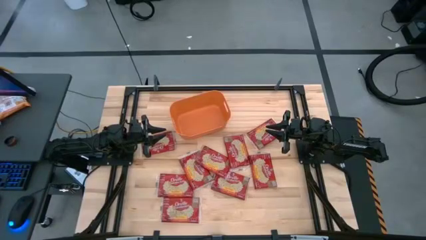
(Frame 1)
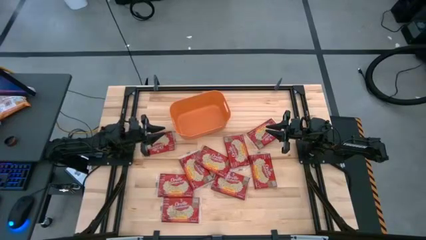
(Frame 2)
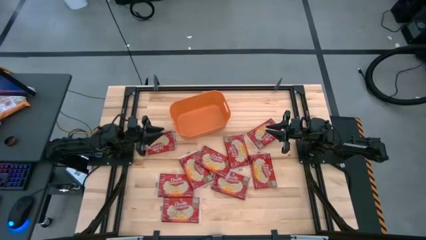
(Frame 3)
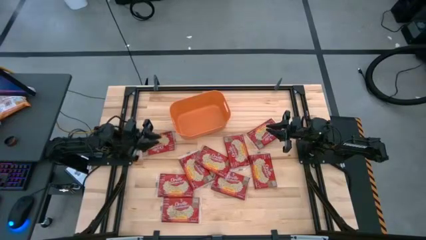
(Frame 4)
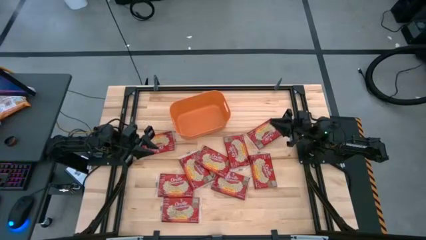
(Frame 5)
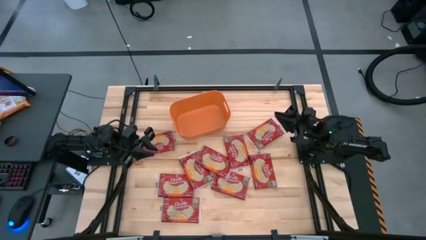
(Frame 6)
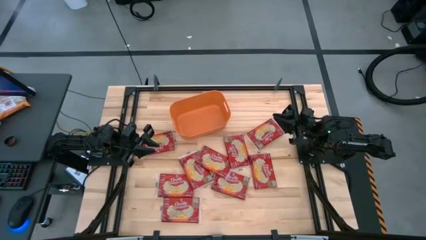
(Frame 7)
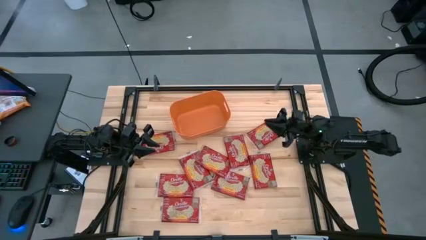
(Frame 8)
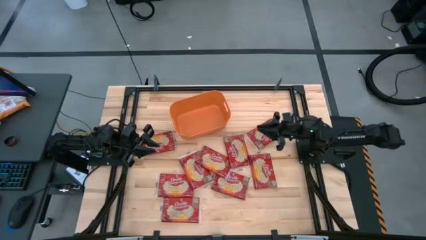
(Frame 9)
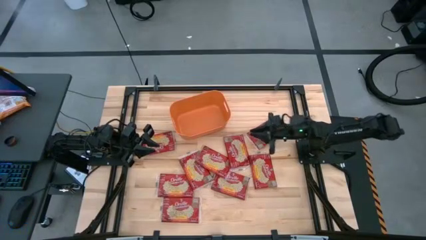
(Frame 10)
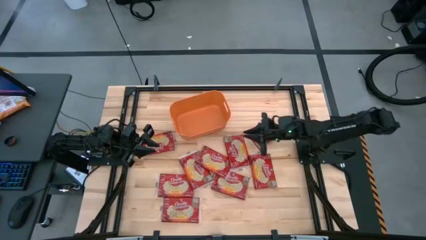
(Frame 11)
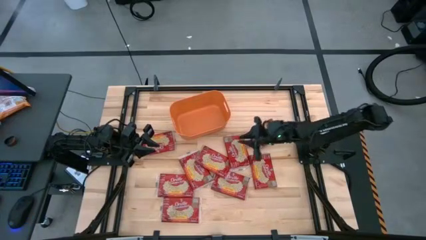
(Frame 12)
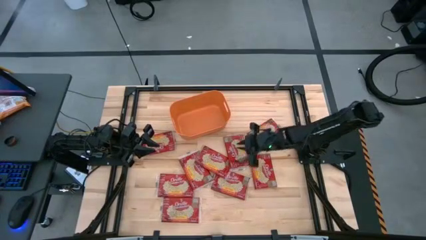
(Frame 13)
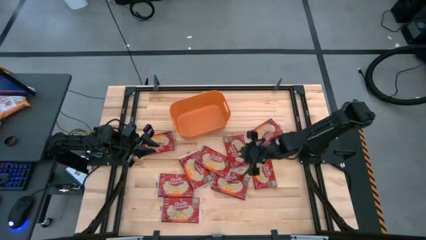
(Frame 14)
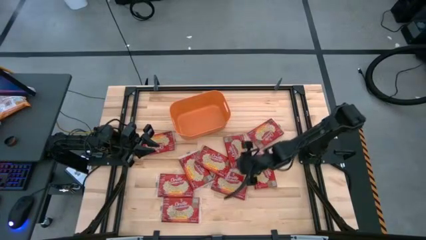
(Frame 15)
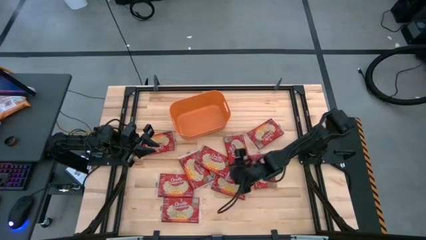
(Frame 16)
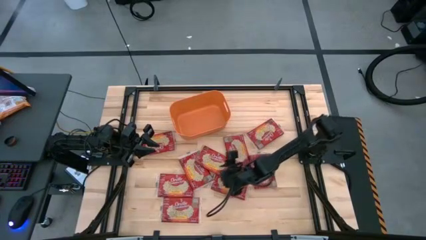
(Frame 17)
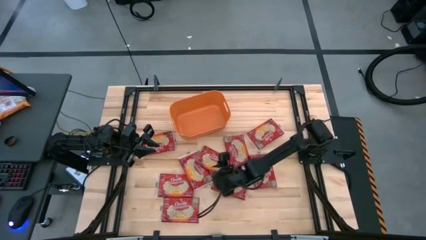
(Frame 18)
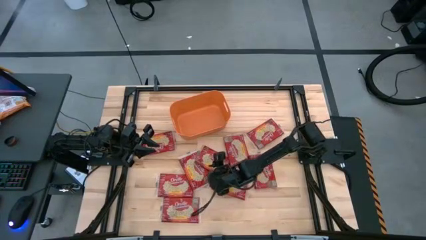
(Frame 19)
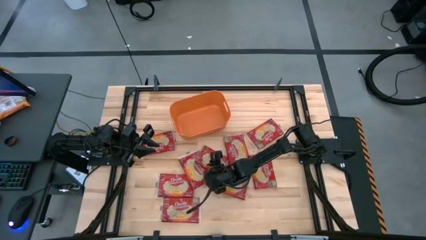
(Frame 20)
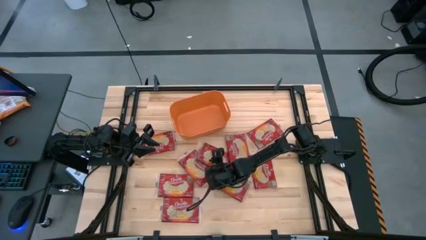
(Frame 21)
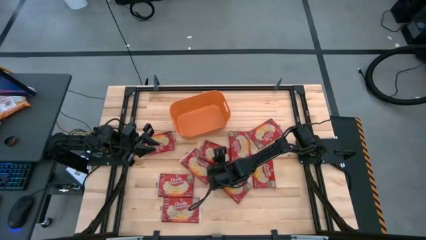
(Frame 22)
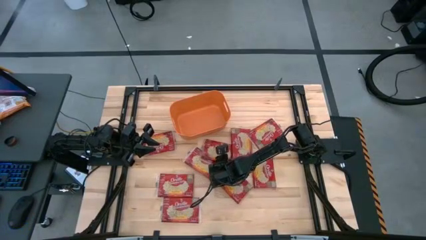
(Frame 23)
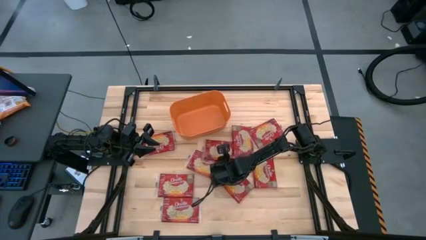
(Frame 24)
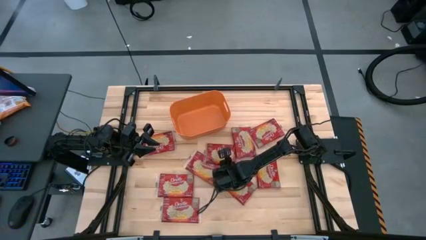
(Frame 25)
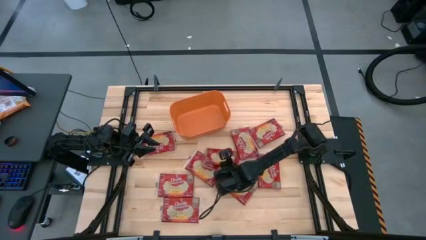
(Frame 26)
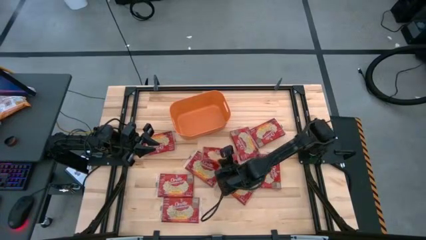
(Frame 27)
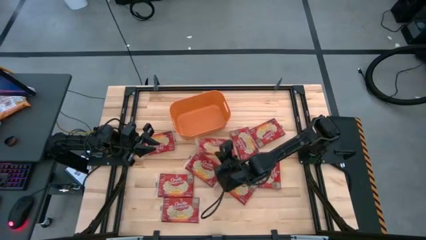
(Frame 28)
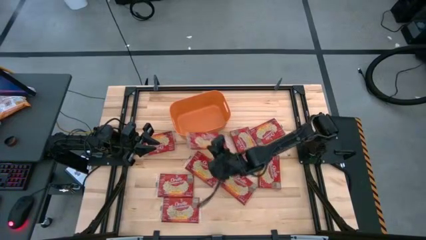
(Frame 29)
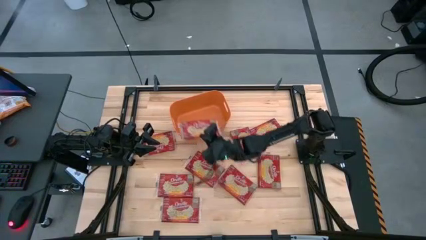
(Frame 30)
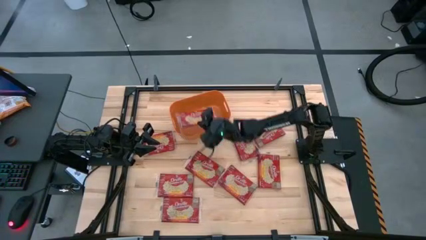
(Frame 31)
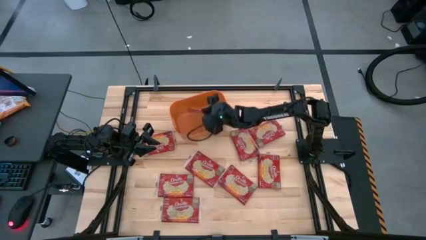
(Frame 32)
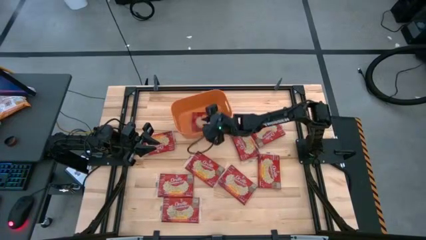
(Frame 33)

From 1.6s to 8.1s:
Task: Sort popcorn bags into baskets
Put the popcorn bag into the orange bin

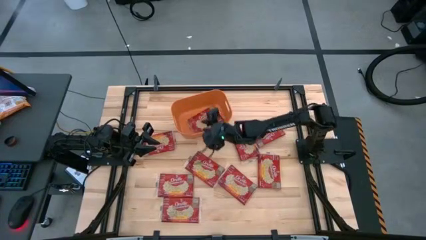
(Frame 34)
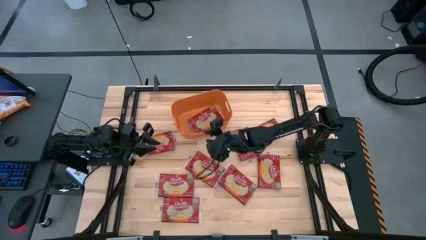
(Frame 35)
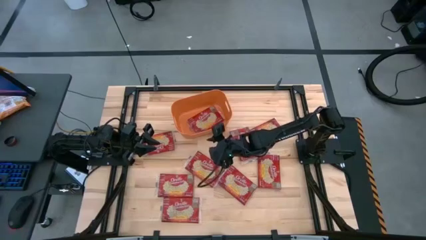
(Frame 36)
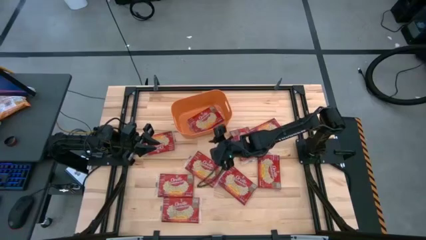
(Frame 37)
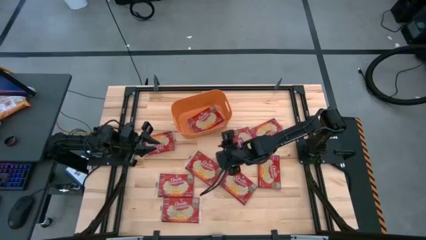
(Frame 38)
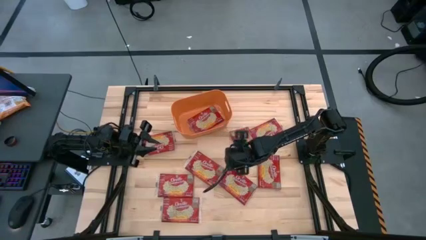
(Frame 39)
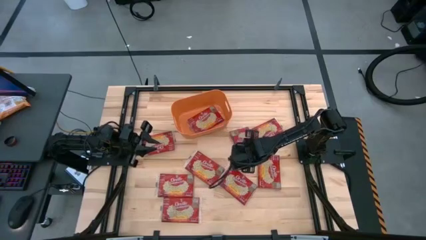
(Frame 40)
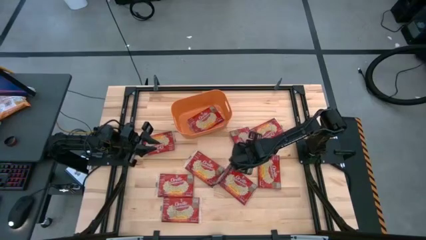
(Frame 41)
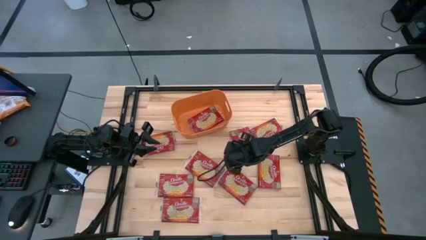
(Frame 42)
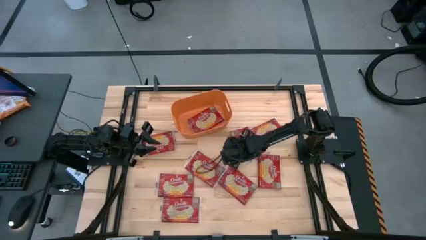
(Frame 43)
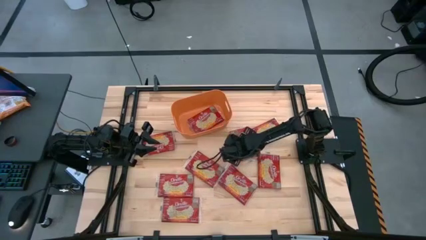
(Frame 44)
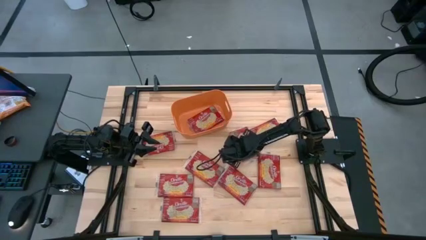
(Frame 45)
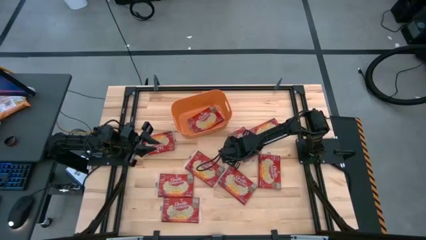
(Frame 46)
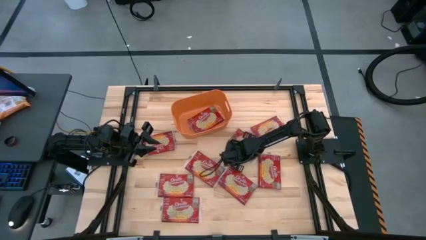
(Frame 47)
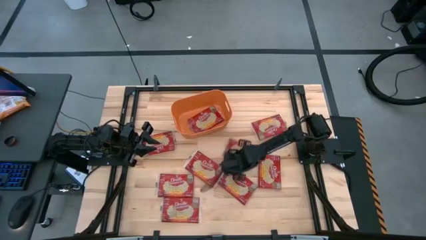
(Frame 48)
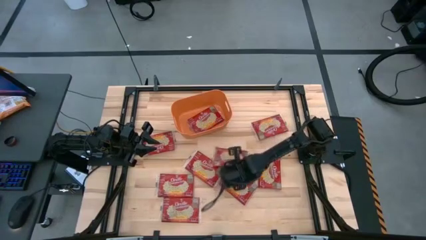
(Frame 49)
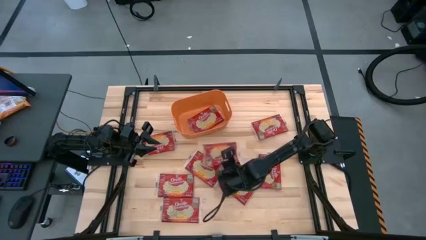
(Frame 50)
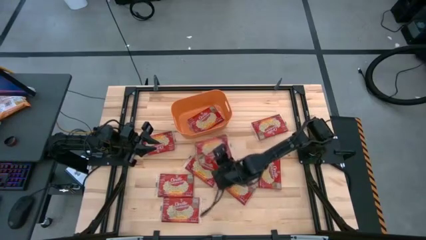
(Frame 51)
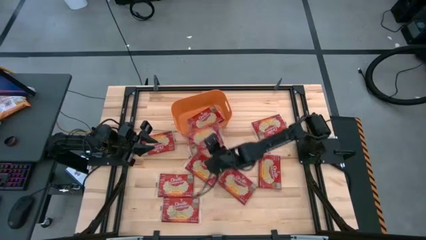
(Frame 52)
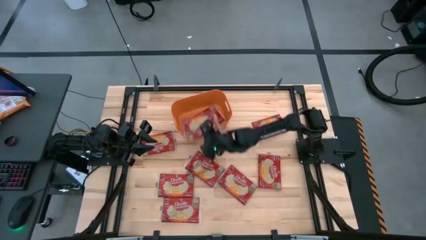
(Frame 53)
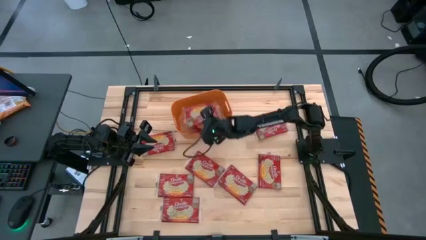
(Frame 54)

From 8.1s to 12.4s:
Put the popcorn bag into the orange bin

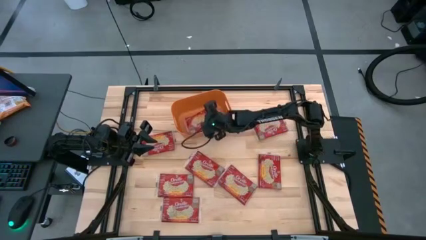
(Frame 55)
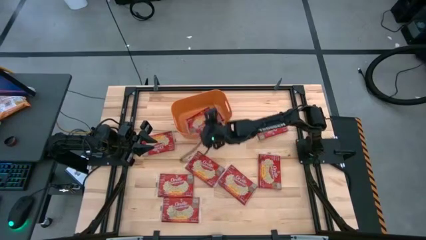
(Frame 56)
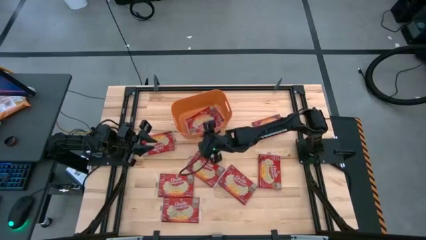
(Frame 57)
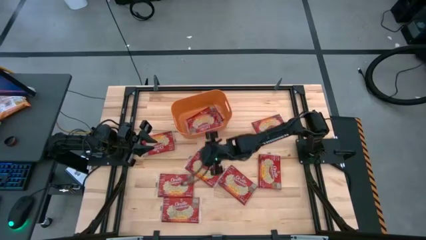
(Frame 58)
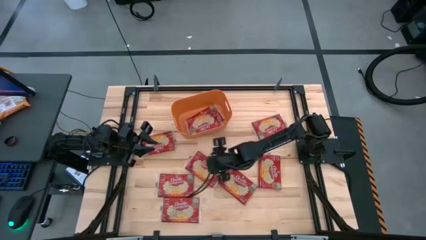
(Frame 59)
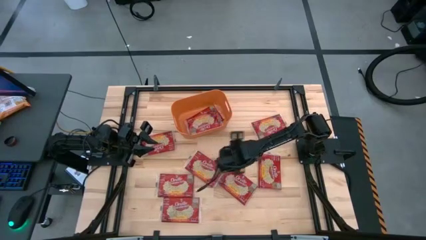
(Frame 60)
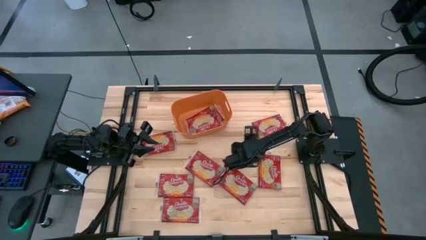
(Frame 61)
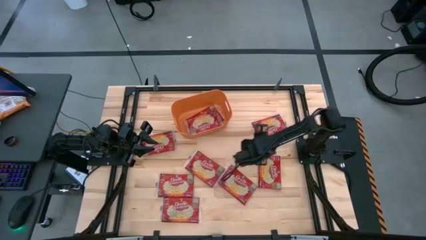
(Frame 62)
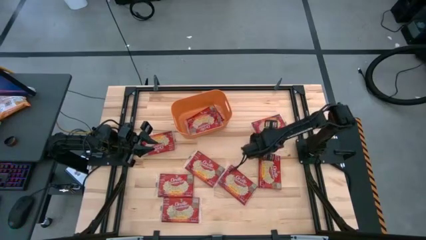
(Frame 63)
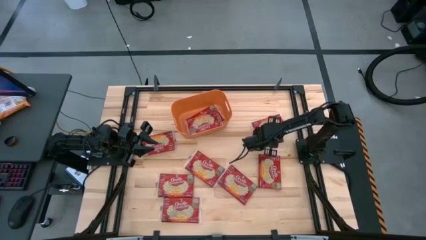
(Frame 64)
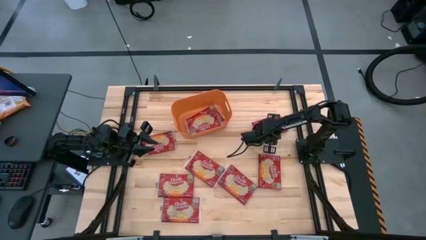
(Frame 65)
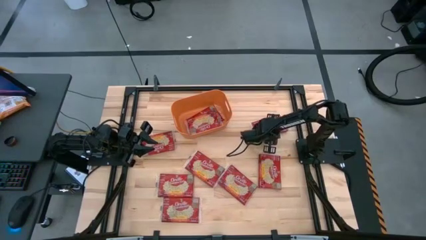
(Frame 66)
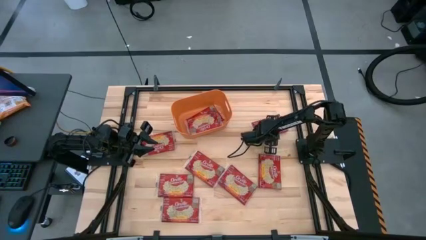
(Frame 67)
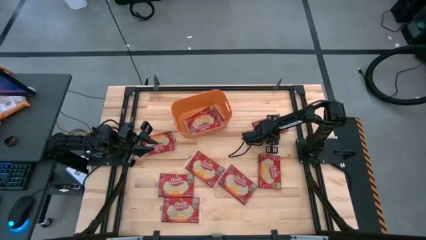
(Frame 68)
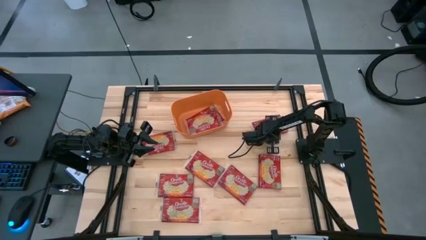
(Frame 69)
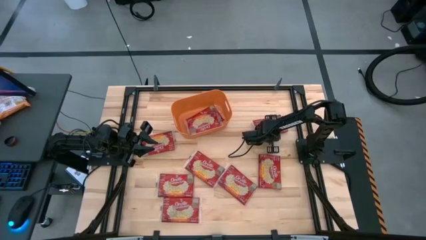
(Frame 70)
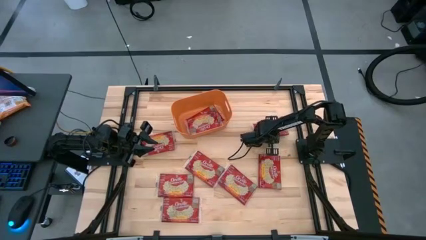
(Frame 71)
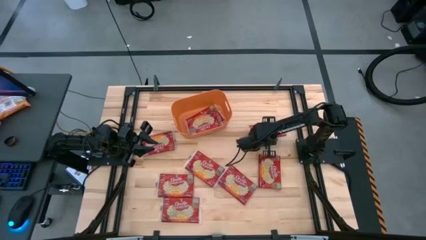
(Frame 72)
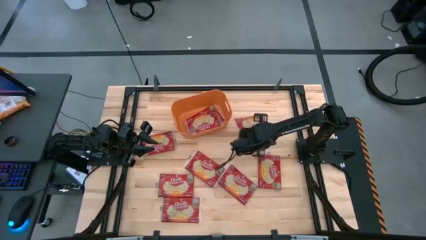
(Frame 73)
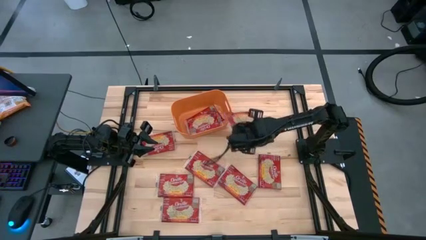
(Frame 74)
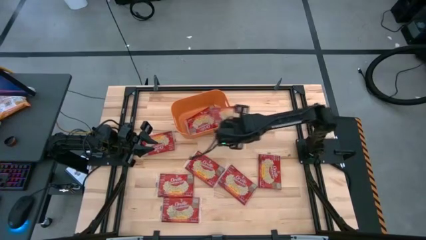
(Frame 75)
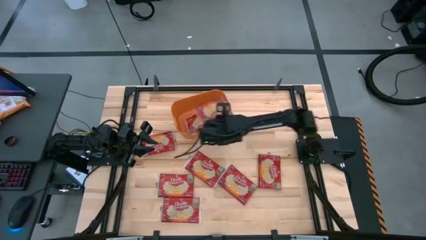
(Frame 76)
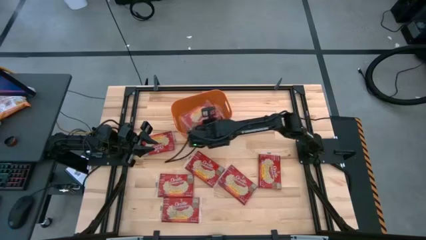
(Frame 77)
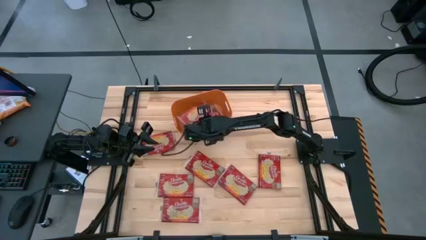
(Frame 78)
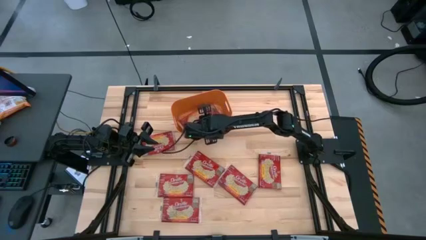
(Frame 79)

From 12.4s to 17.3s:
Put the popcorn bag into the orange bin

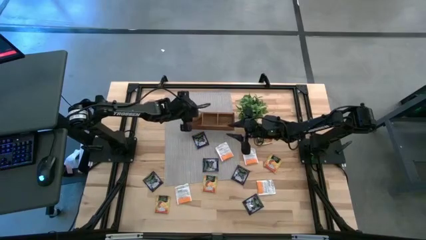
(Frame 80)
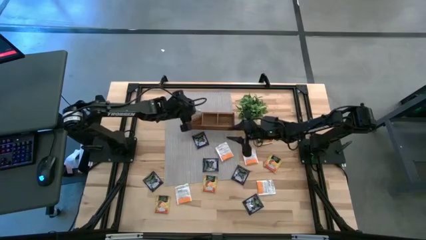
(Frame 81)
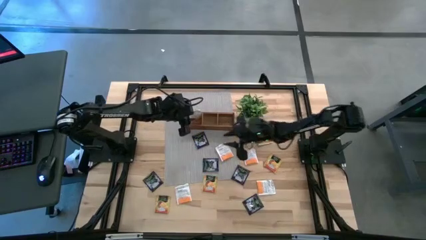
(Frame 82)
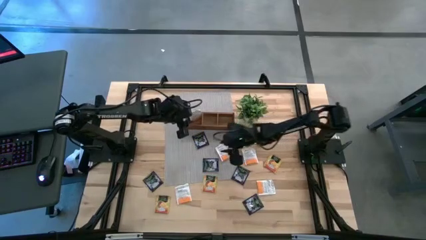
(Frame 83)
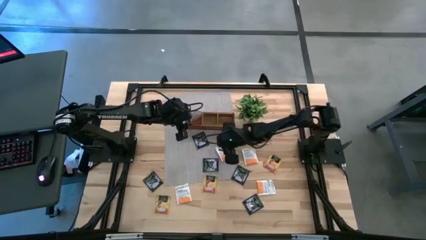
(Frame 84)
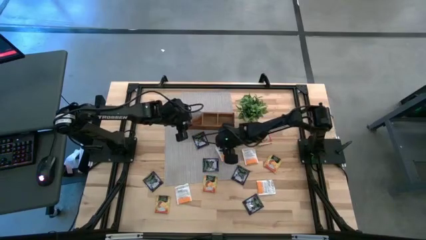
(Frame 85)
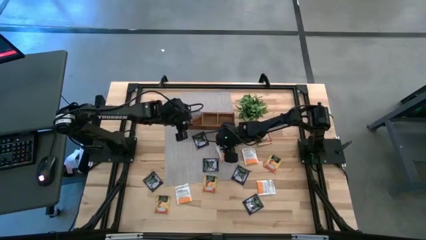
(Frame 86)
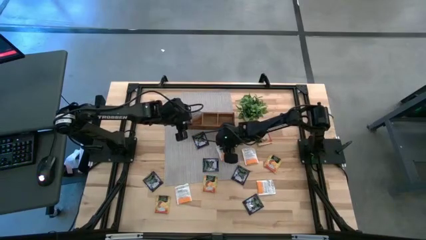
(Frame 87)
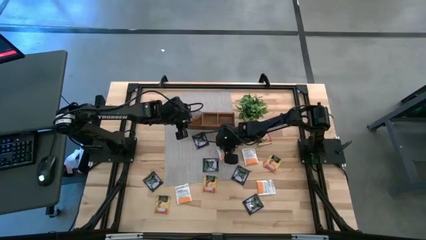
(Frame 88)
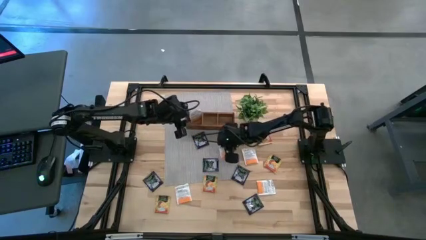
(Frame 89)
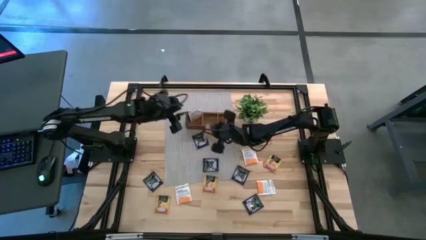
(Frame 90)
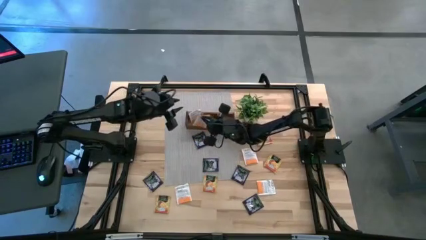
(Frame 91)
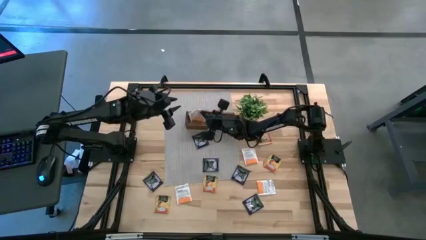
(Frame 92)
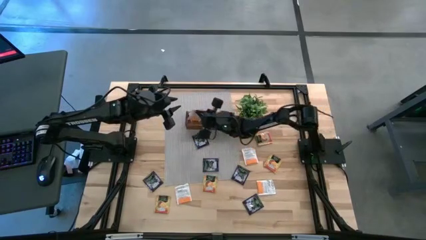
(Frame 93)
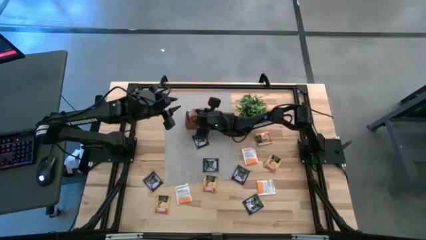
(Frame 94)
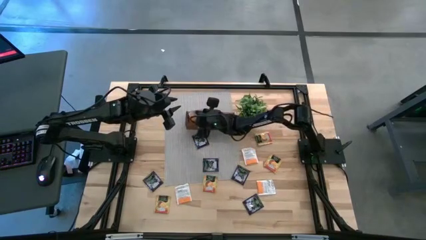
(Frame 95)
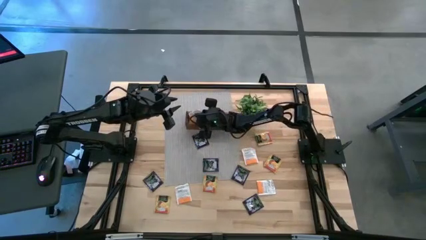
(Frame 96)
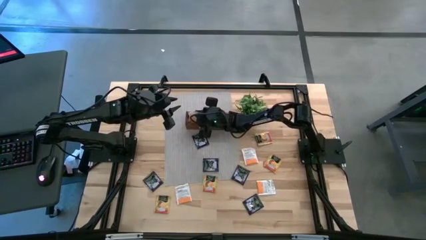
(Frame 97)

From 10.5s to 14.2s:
Task: Pick & Place Tea
Put the white tea bag in the left section of the brown wooden organizer
